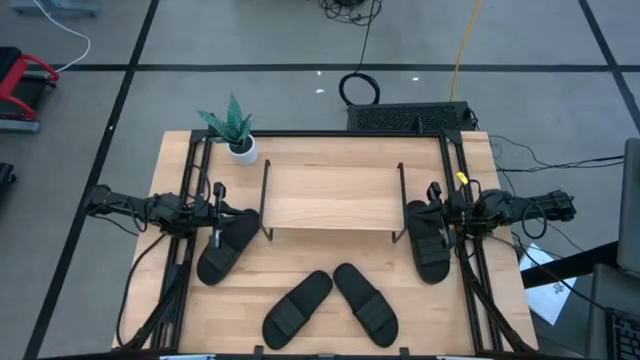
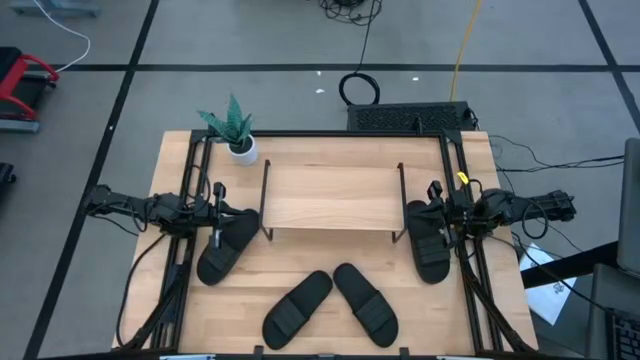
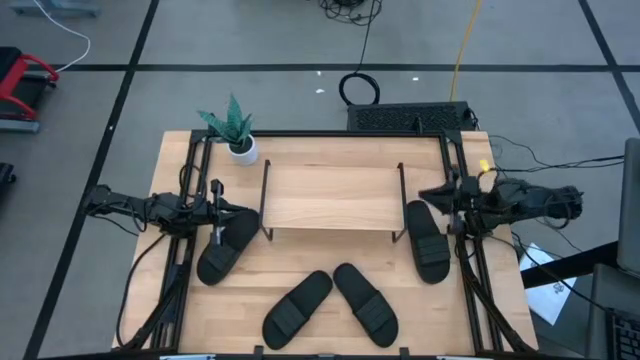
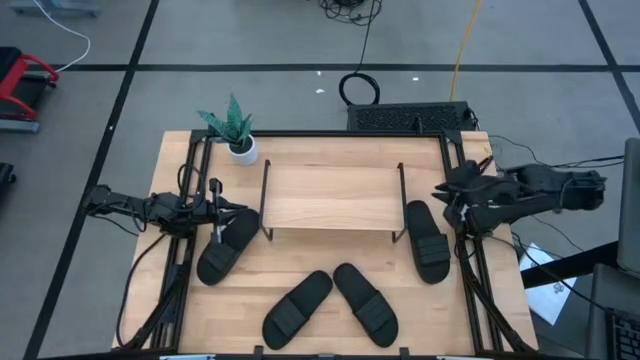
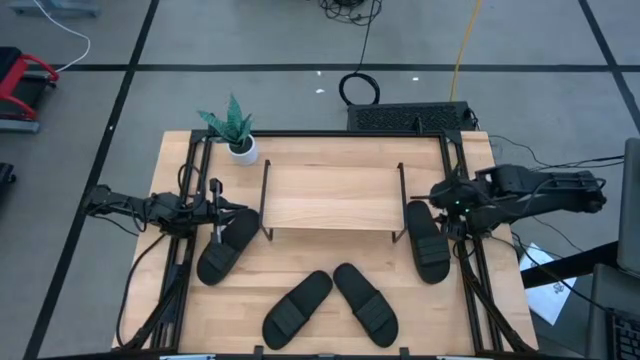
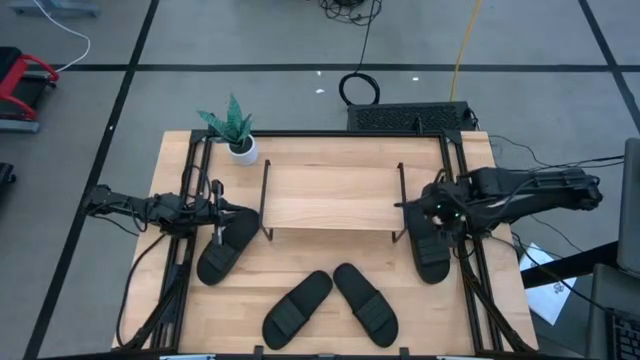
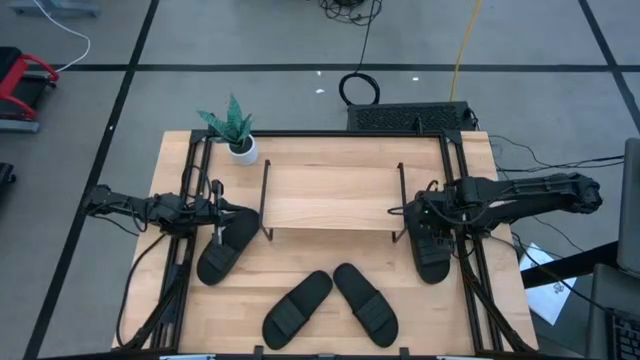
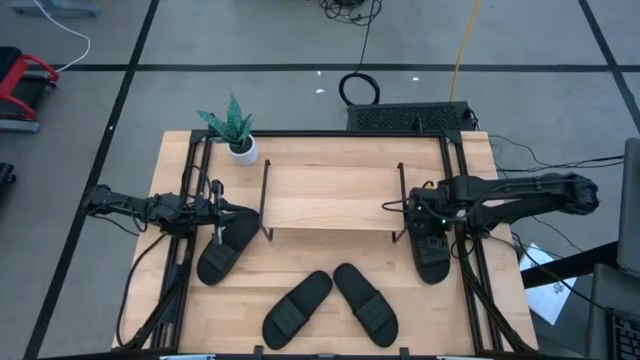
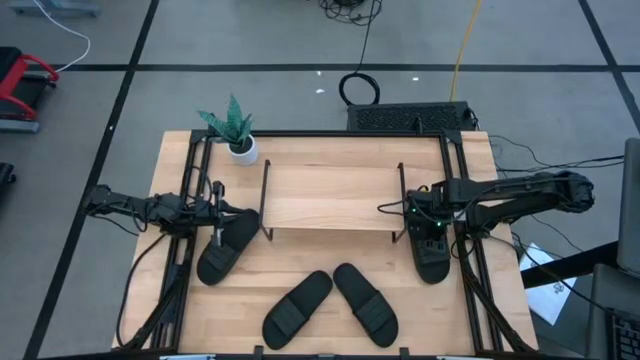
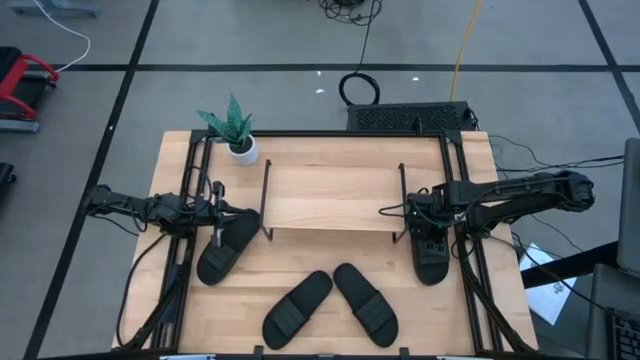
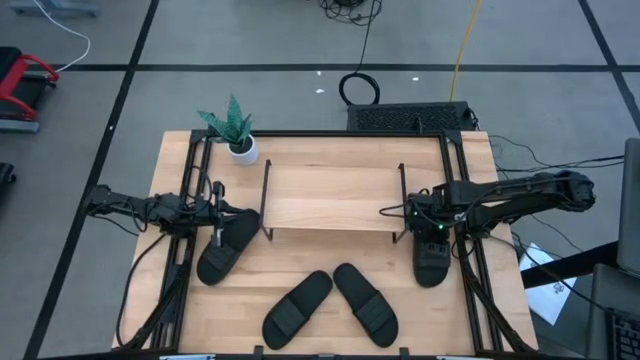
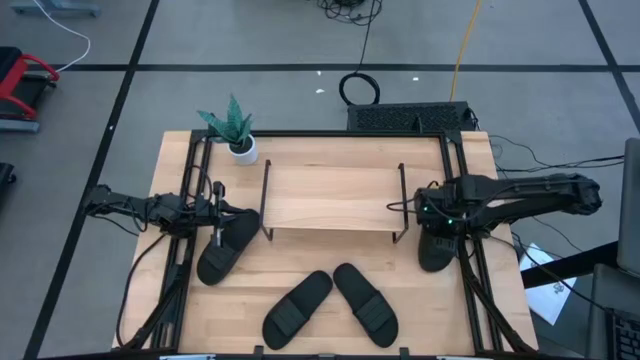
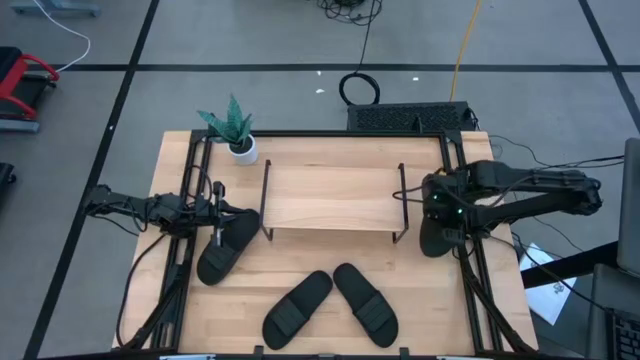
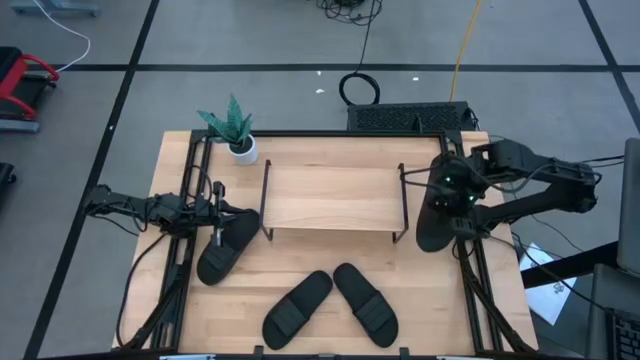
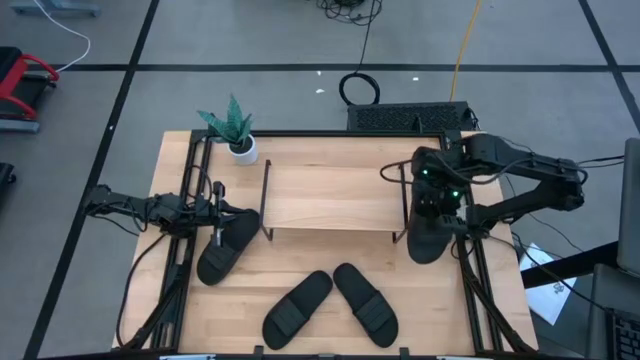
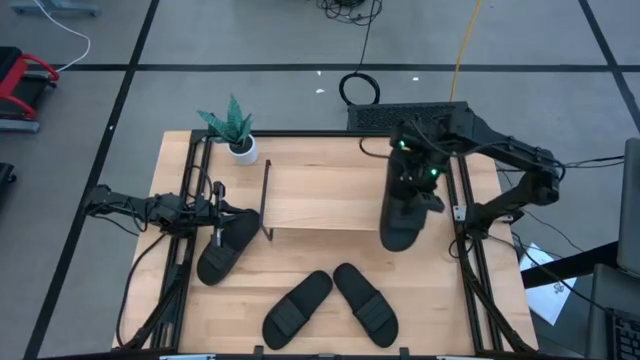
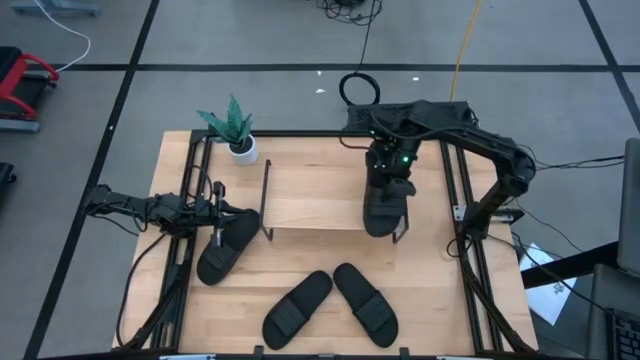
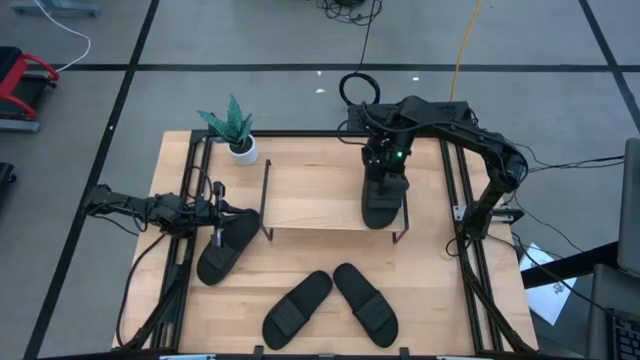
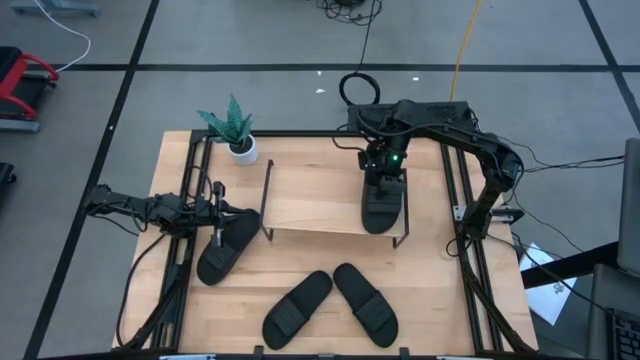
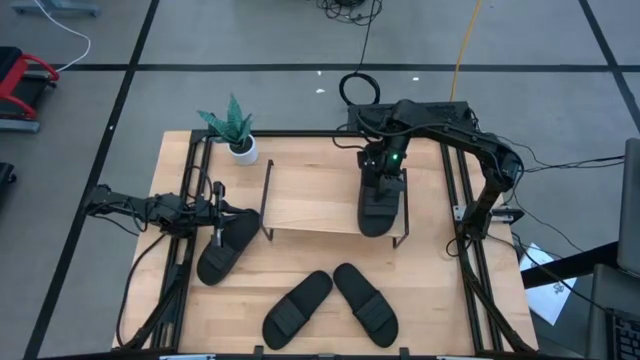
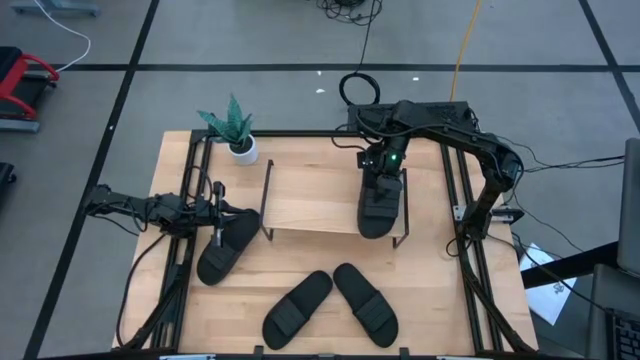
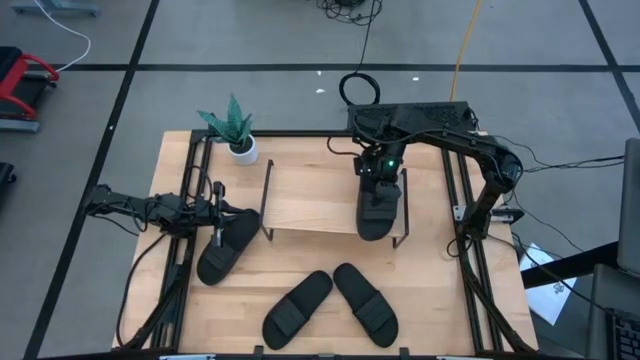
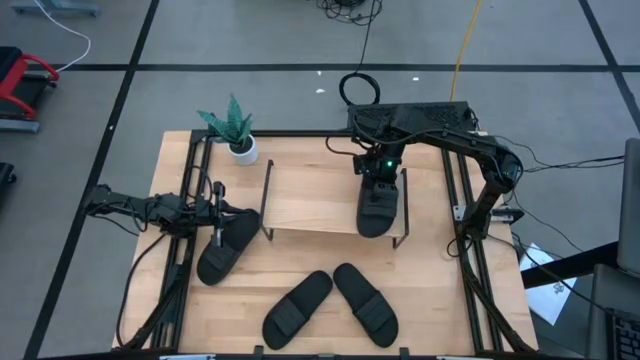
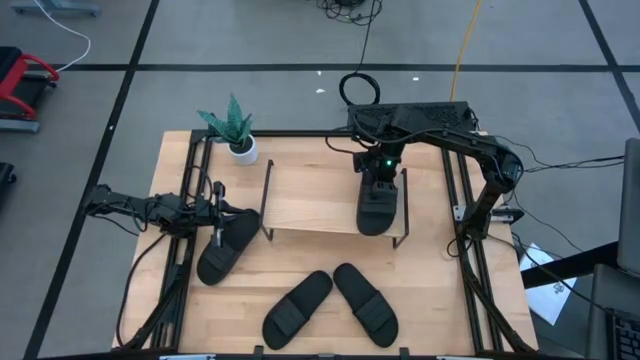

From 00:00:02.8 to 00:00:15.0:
Task: Pick and place slides into the shelf
Put the top right black slide on the shelf

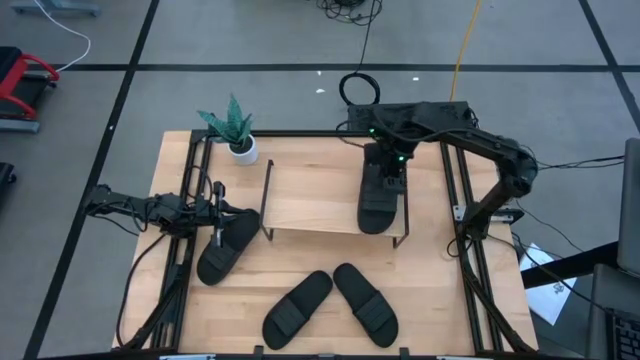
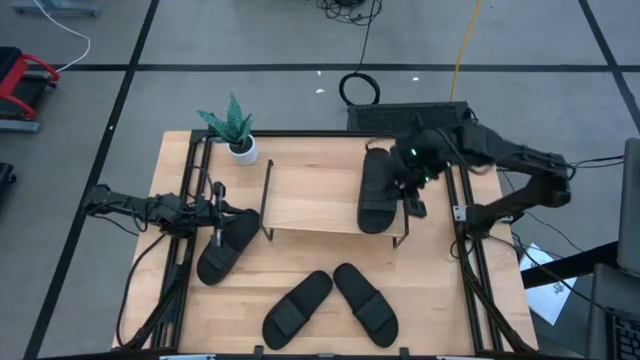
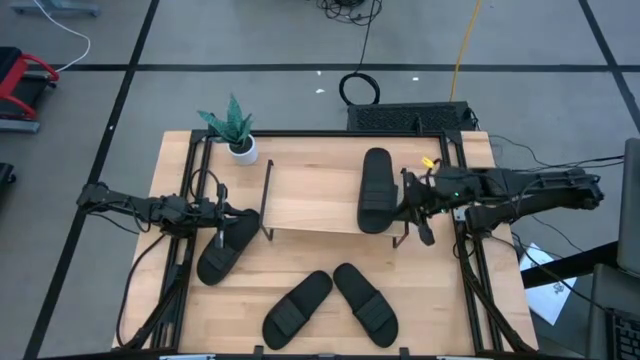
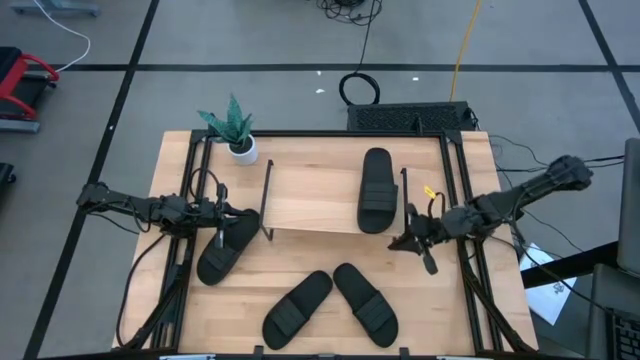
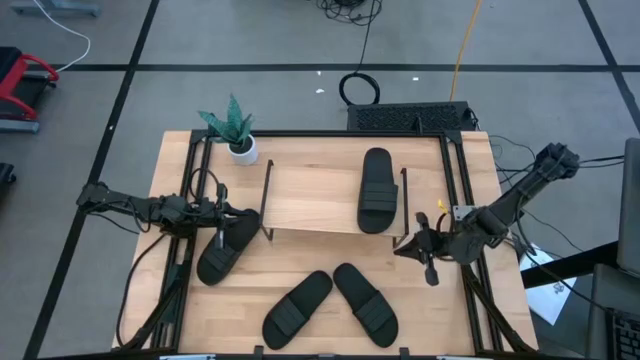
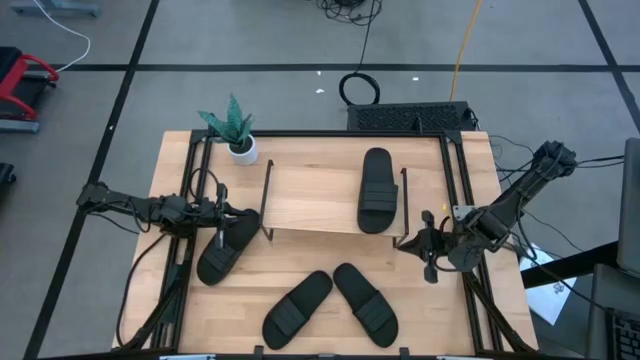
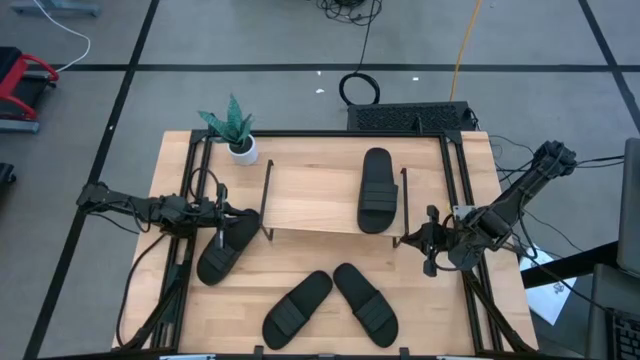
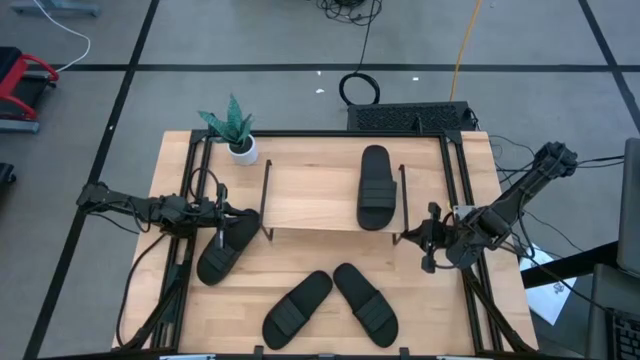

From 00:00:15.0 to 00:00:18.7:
Adjust the shelf

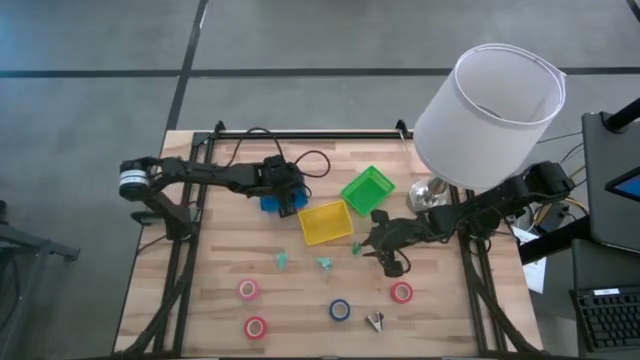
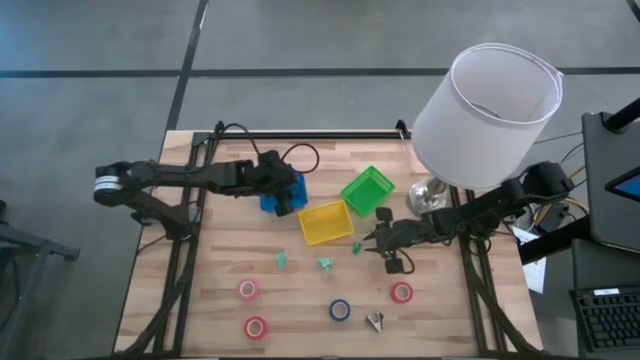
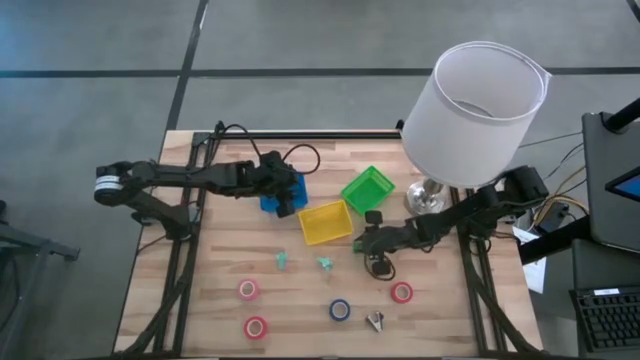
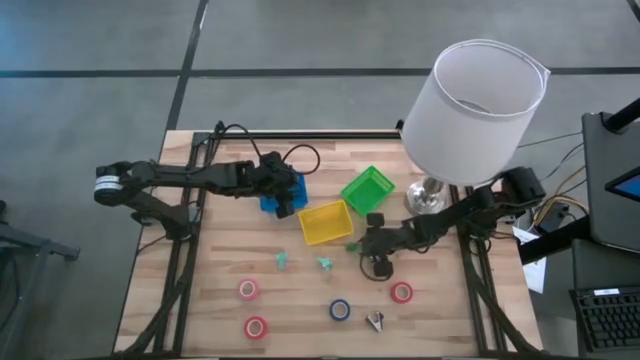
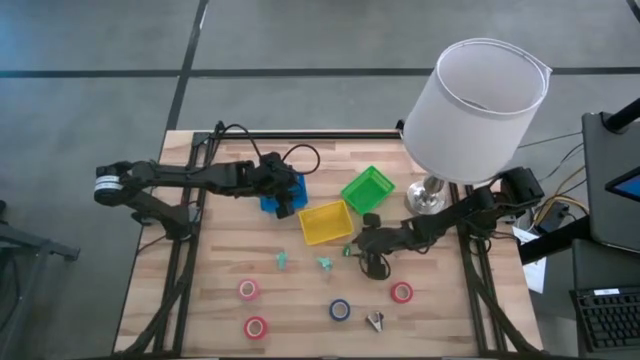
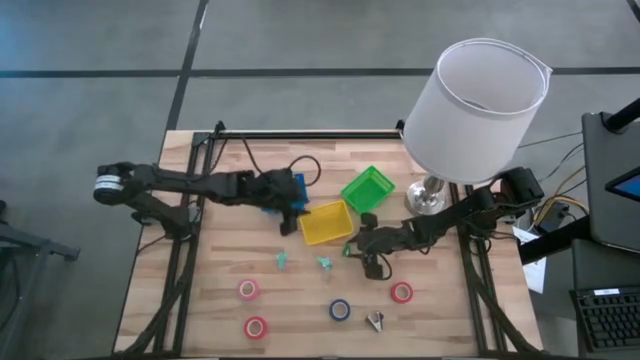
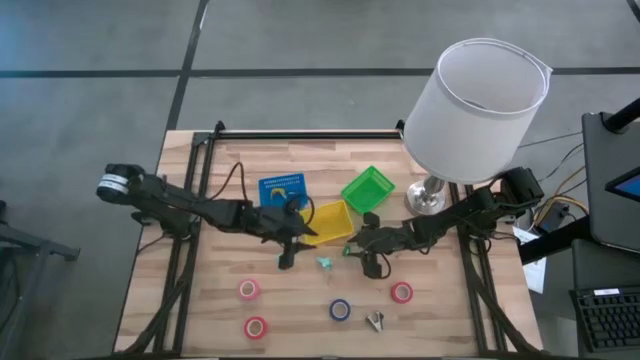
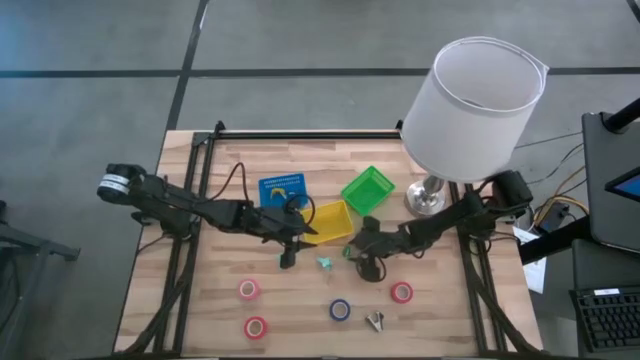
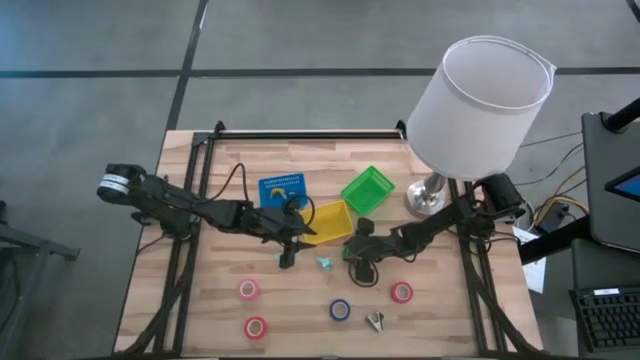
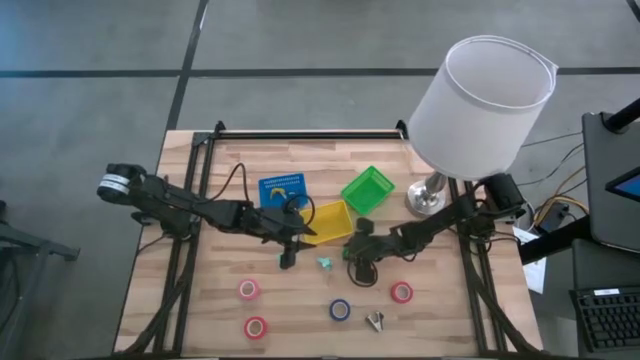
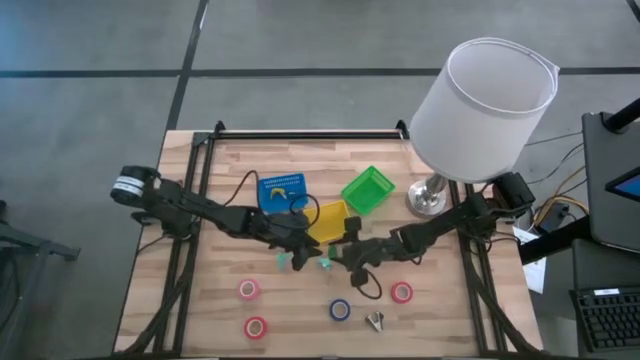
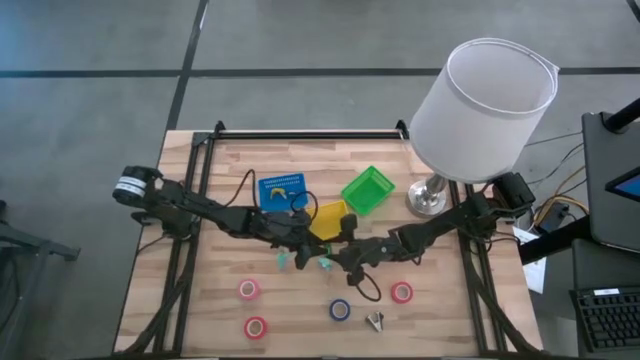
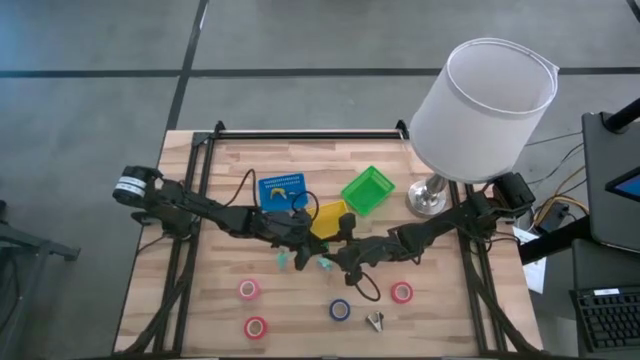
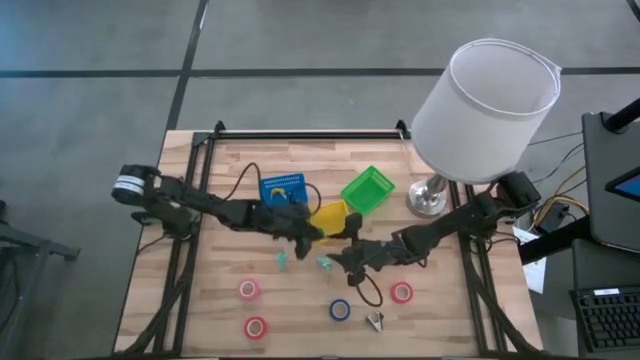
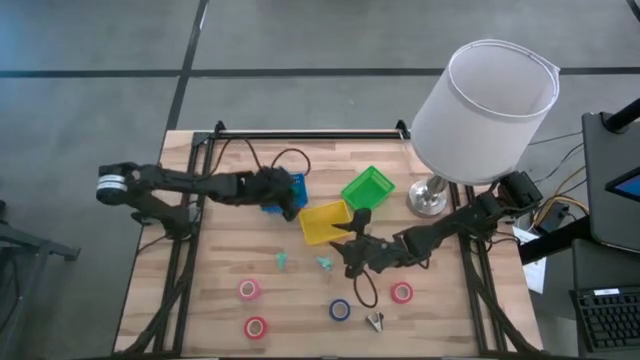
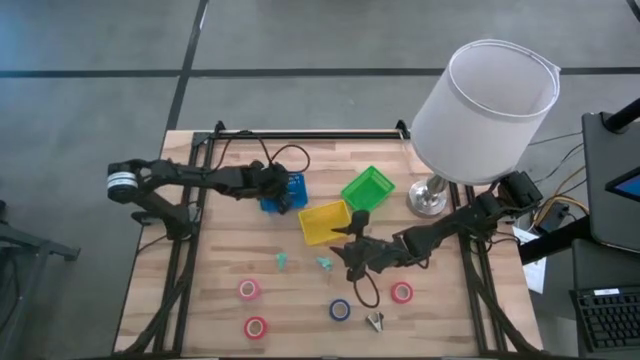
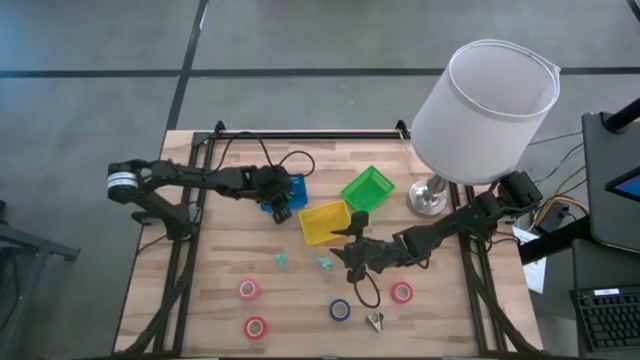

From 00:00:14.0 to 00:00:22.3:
Task: Pick and place Stapler, Stapler remover, tape
Put the green stapler into the blue bin
